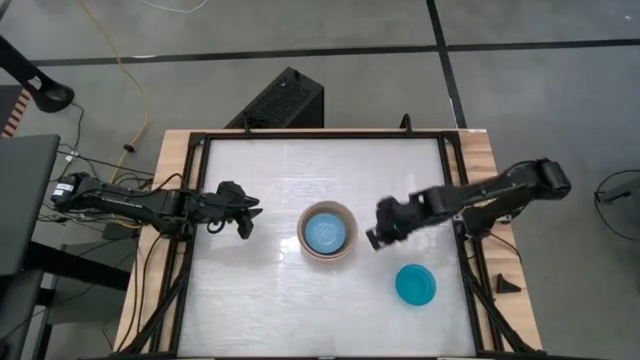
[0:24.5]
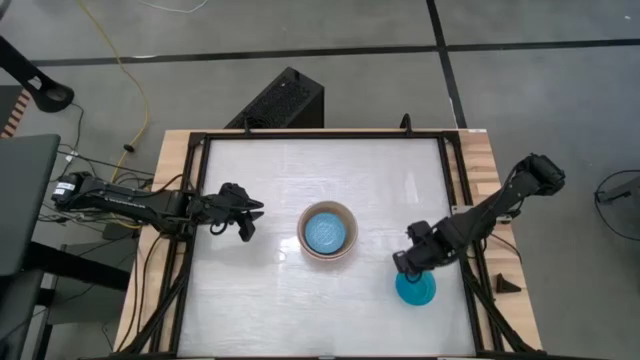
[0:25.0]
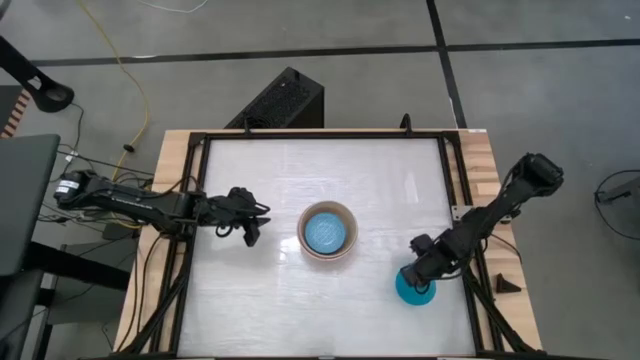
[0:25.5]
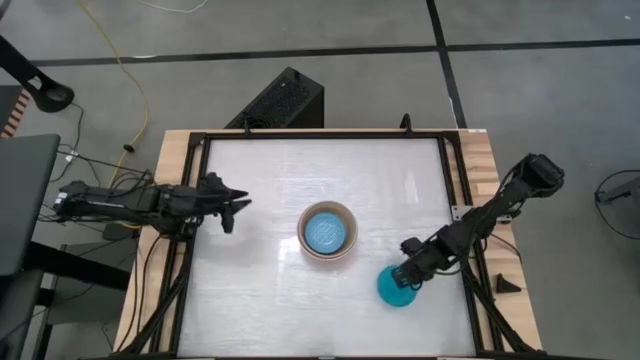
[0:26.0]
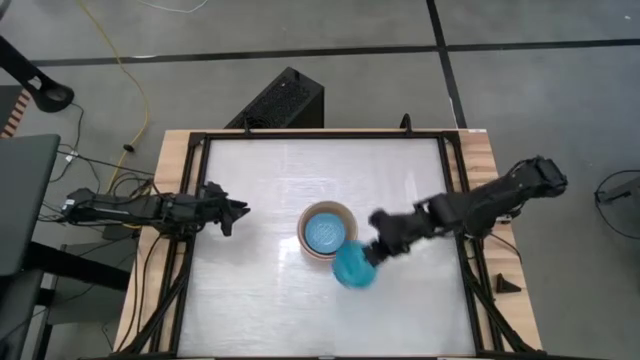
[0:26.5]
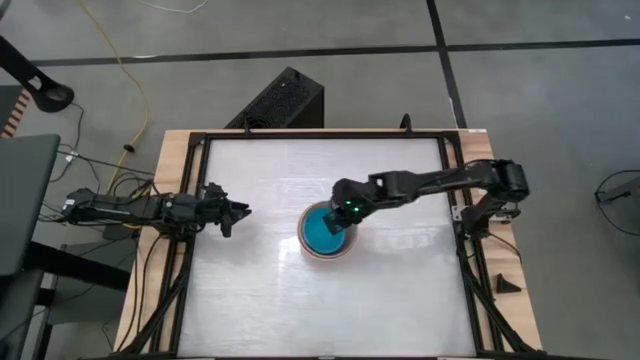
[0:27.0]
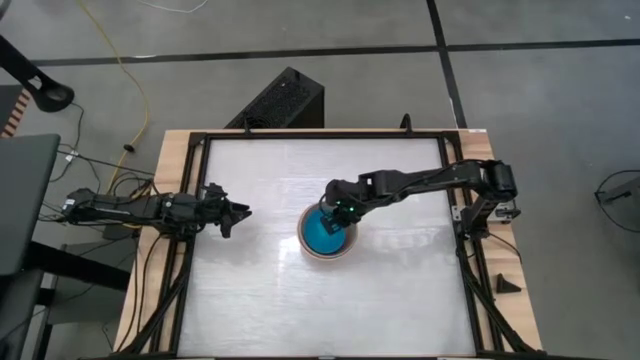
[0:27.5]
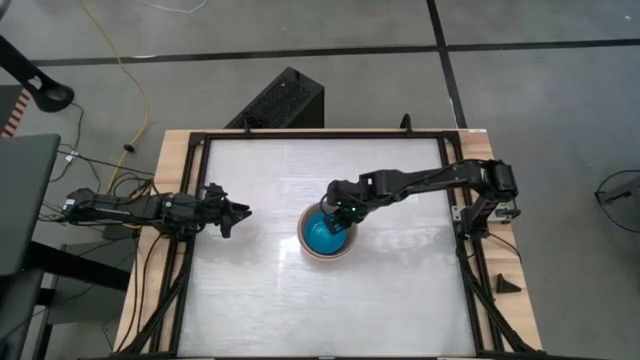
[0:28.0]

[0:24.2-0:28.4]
Stack the blue bowl on top of the blue patterned bowl

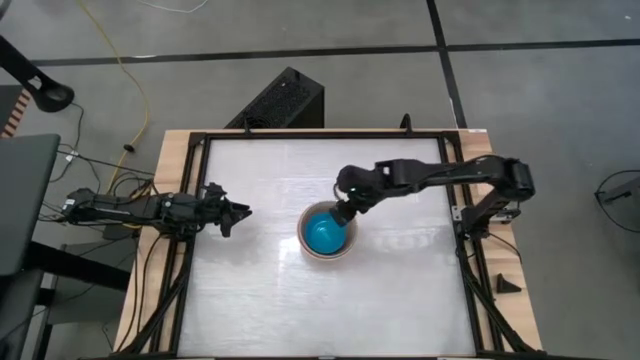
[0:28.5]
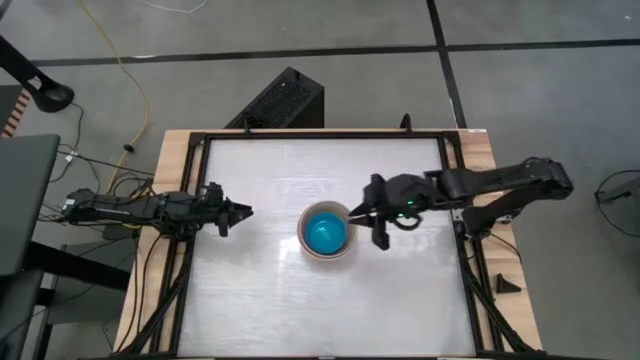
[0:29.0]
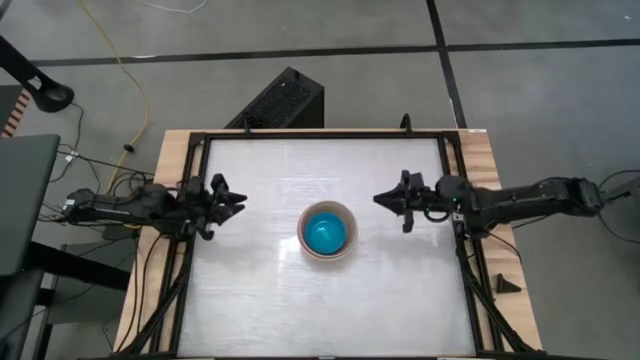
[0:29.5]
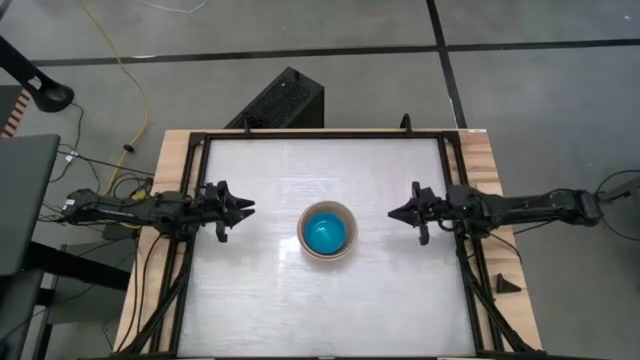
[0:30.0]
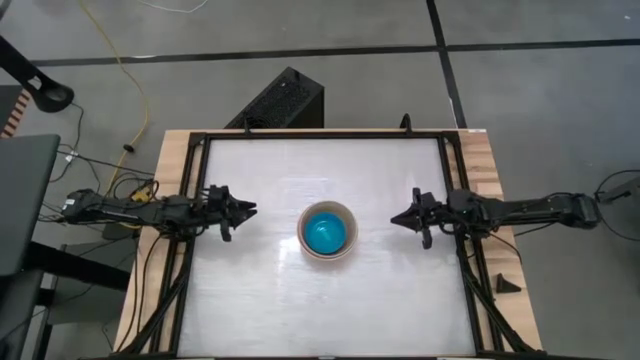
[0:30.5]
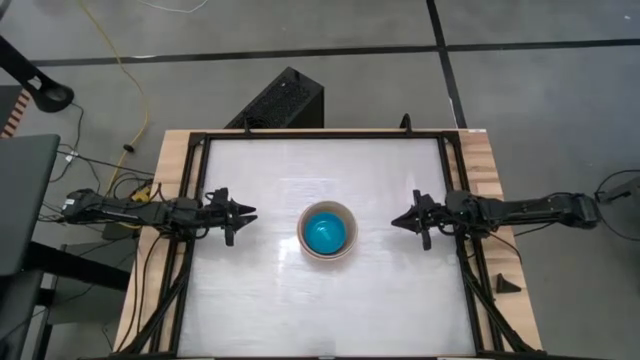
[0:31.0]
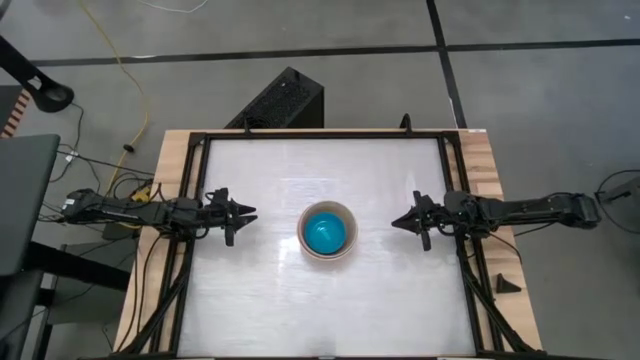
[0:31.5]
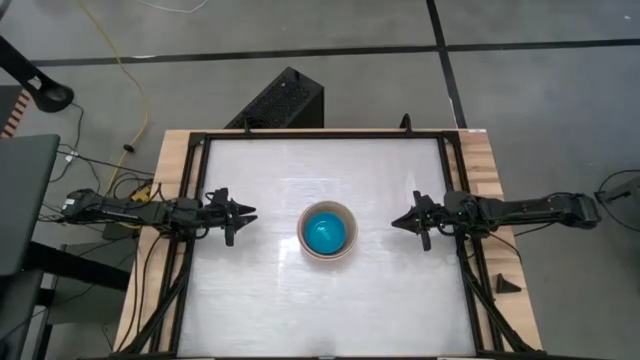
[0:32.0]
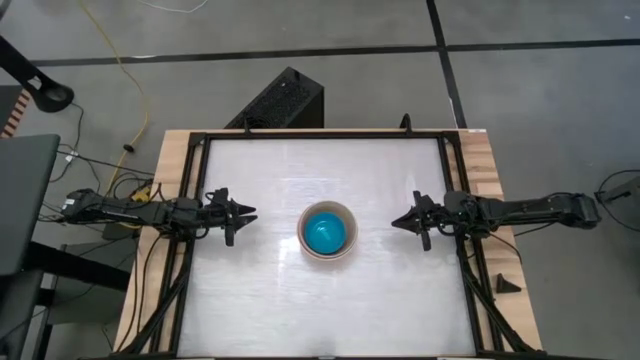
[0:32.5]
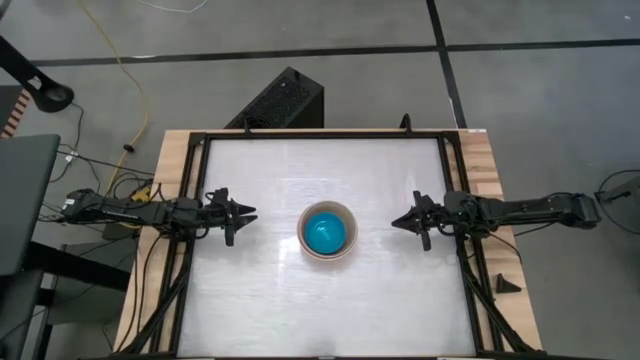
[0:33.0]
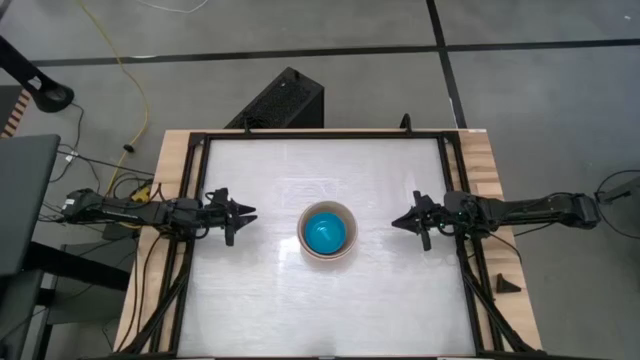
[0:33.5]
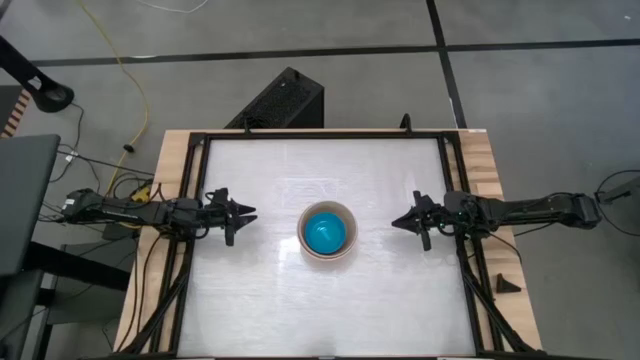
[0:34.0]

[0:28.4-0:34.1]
Return to Home Position

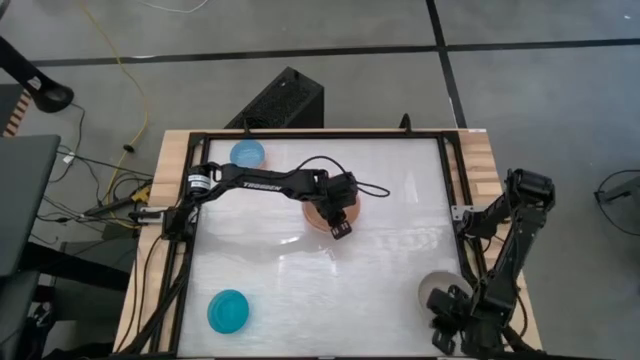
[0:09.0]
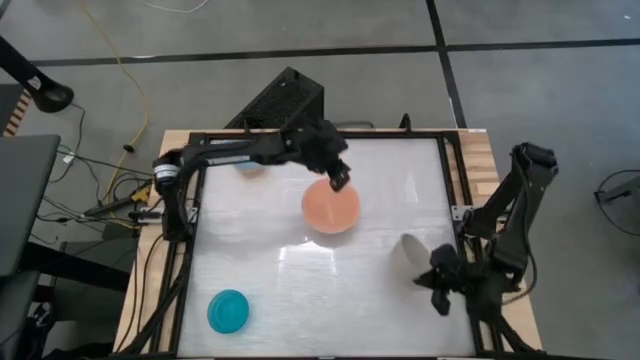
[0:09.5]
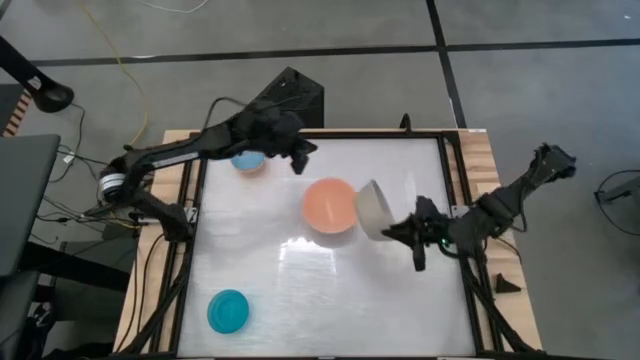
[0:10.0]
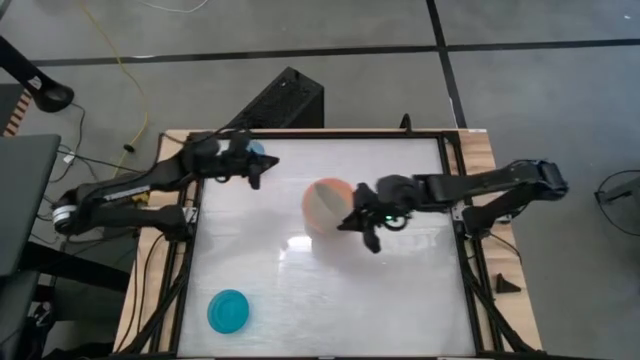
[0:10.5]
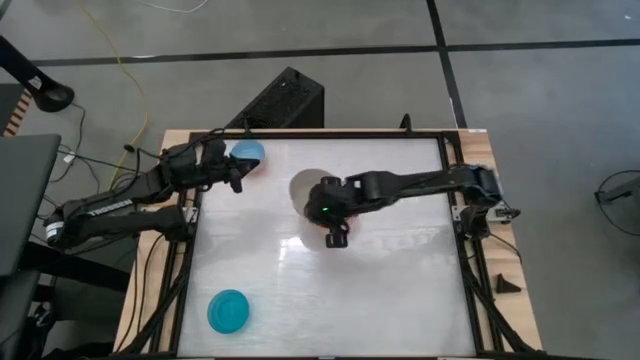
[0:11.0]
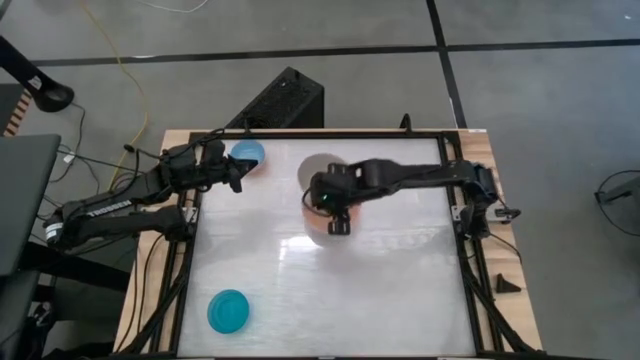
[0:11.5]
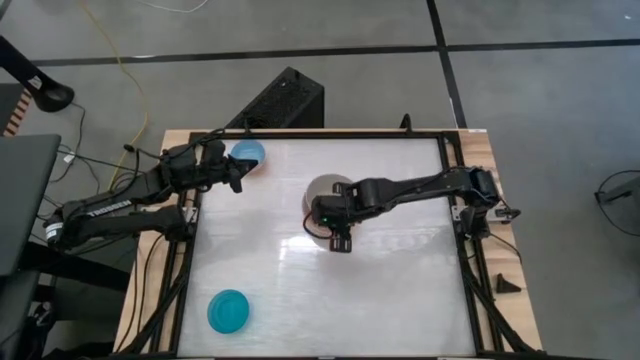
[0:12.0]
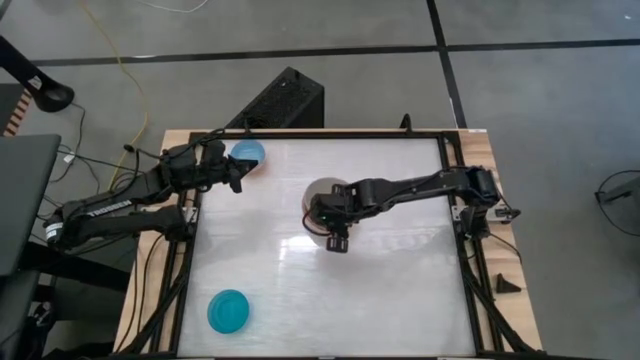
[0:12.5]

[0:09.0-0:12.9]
Stack the white bowl into the orange bowl

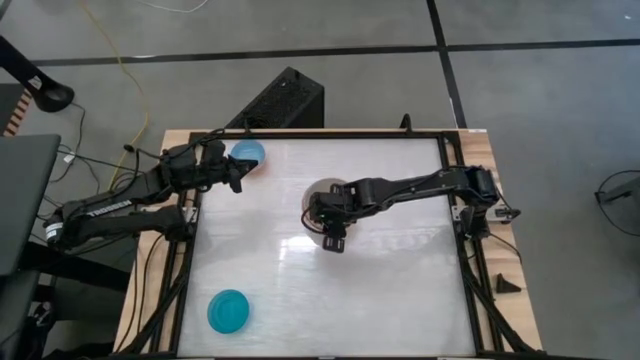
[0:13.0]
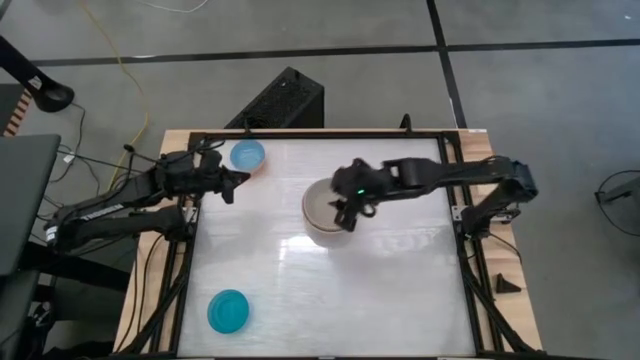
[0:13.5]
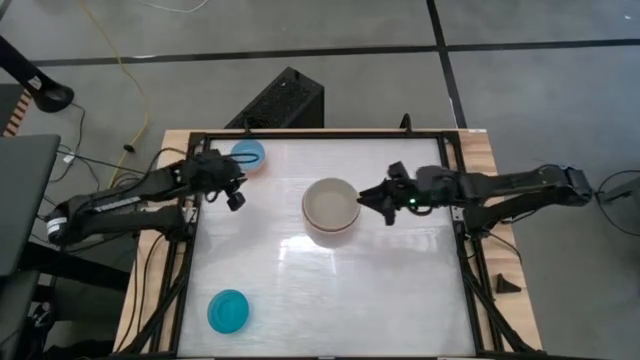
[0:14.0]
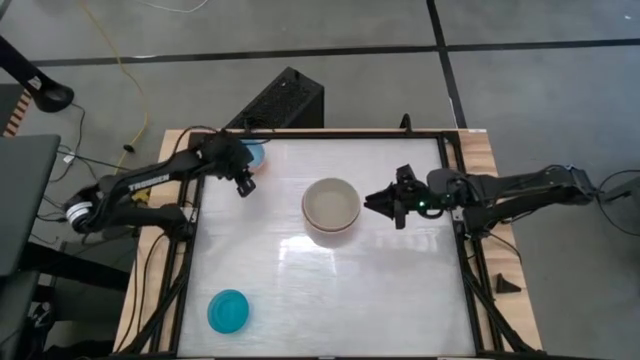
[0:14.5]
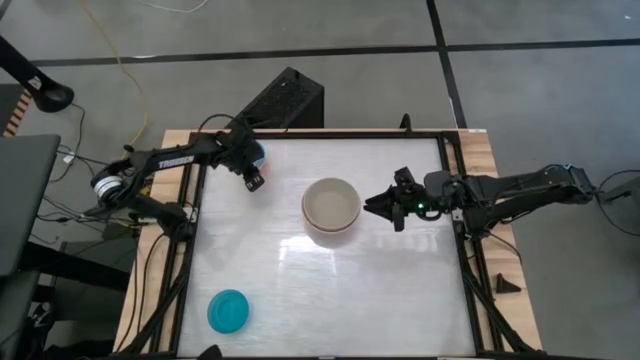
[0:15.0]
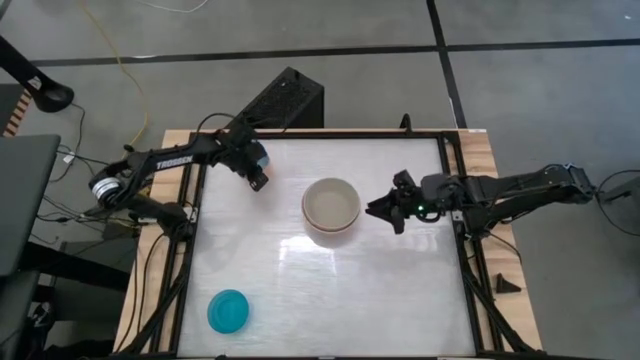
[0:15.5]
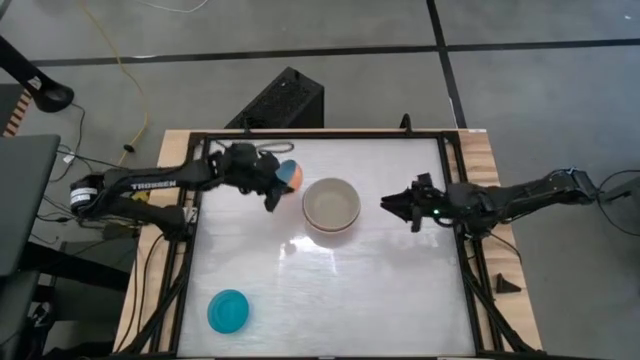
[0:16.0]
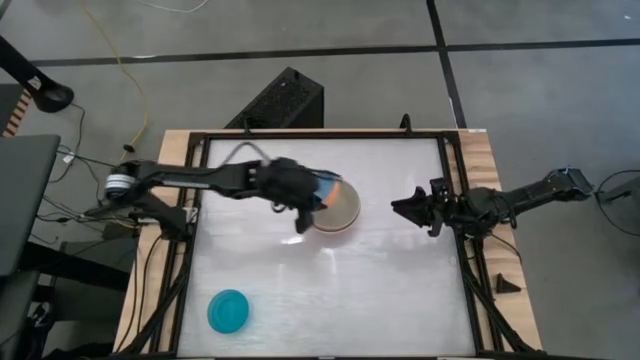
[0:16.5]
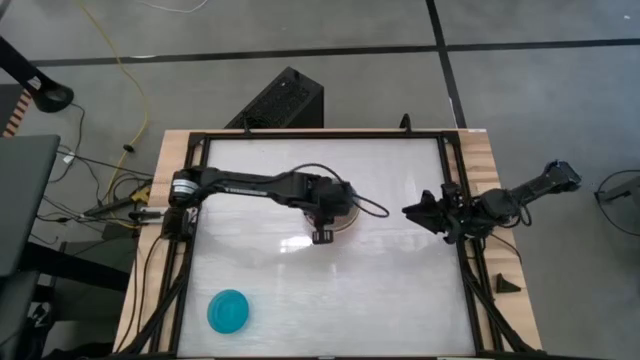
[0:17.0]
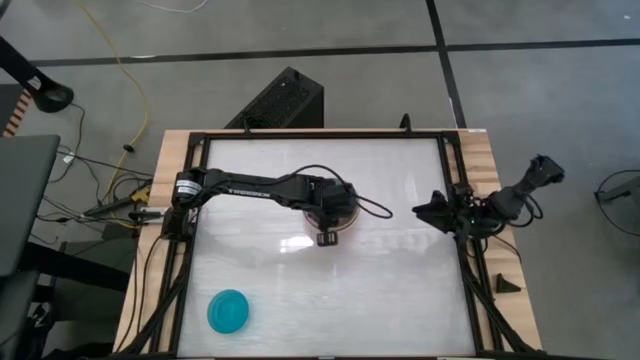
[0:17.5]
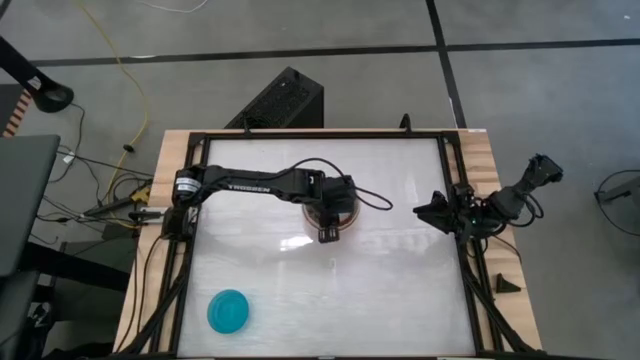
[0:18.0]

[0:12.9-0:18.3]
Stack the blue-patterned and orange-patterned bowl into the gray bowls

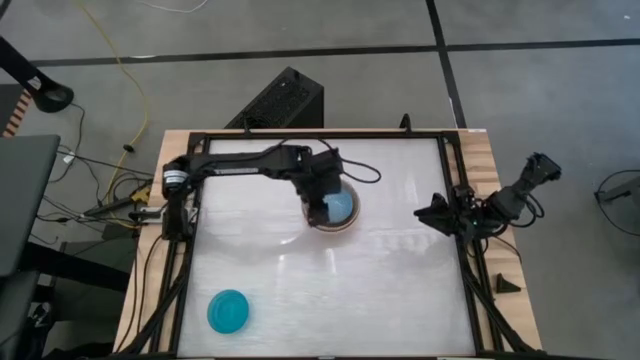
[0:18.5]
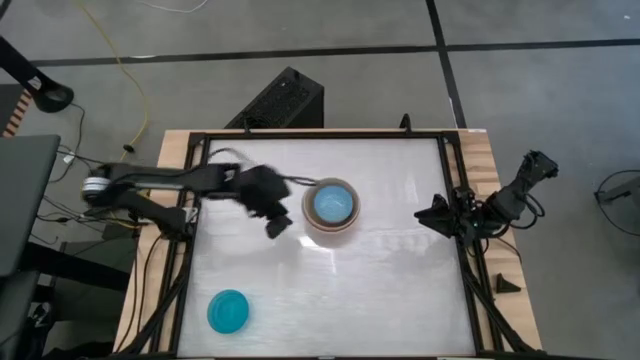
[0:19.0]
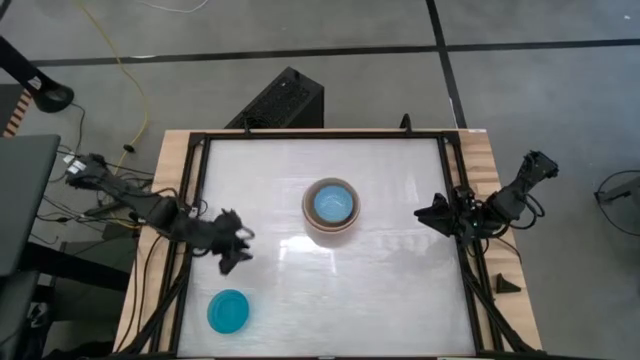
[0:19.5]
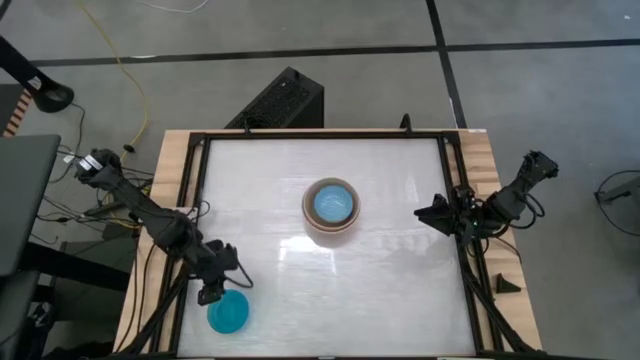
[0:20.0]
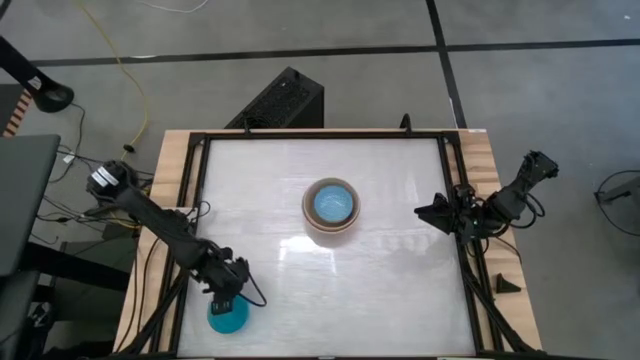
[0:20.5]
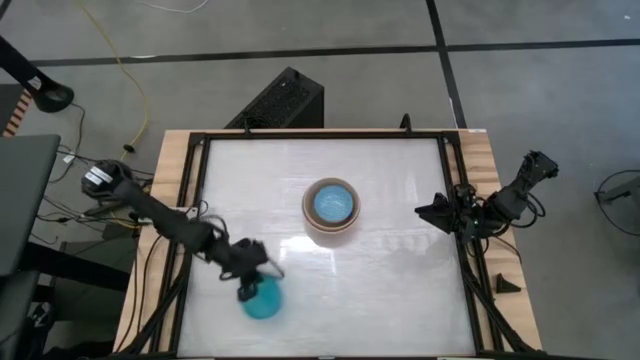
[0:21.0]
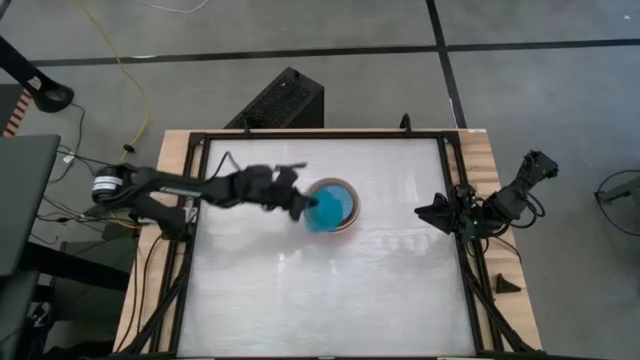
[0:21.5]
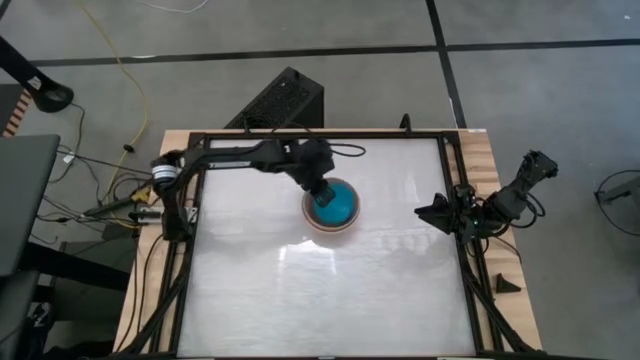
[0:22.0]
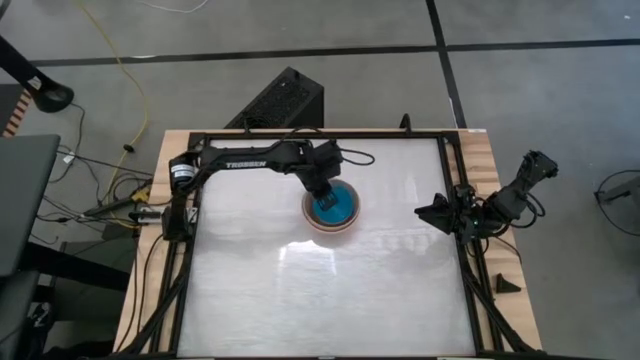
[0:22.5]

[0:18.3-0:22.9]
Stack the blue bowl into the blue-patterned and orange-patterned
